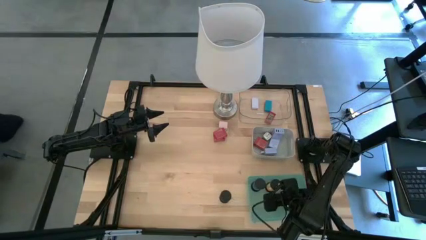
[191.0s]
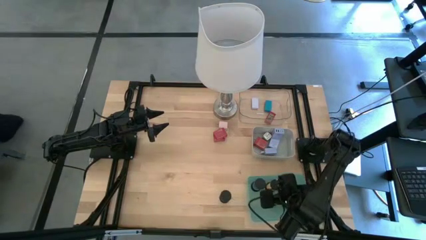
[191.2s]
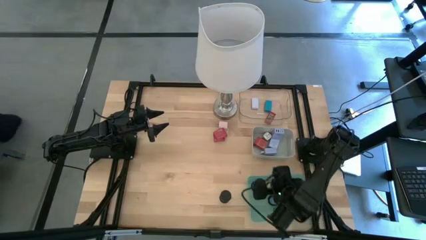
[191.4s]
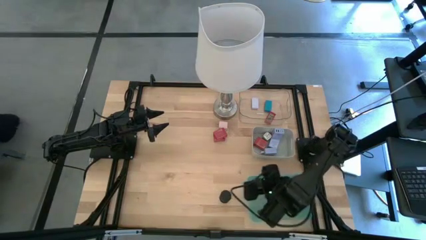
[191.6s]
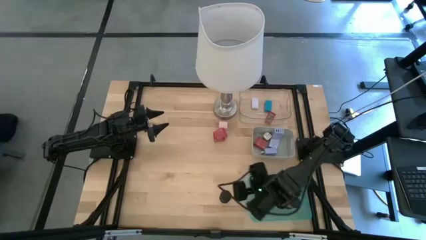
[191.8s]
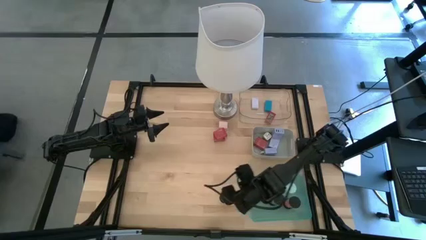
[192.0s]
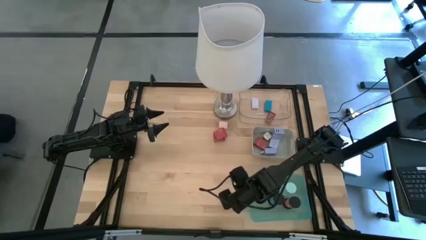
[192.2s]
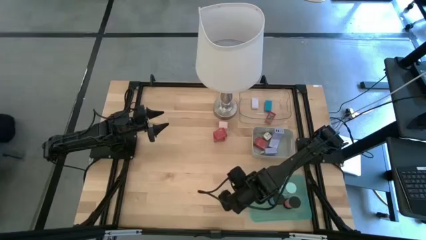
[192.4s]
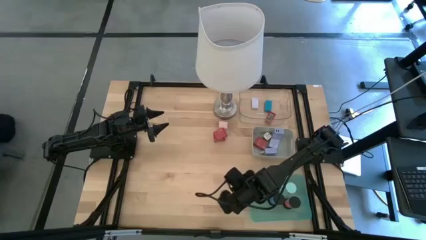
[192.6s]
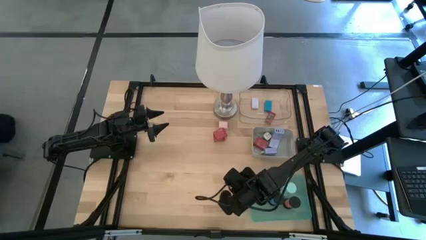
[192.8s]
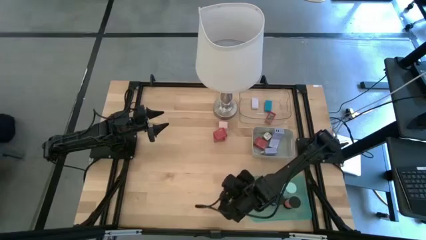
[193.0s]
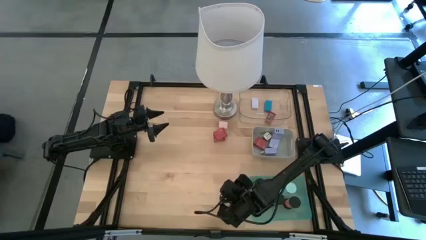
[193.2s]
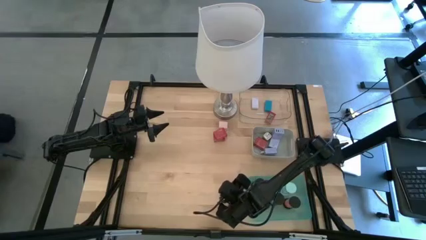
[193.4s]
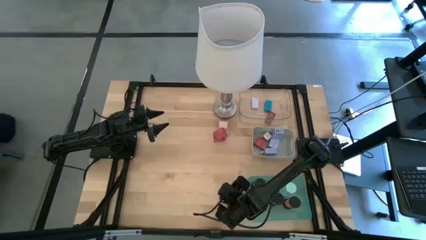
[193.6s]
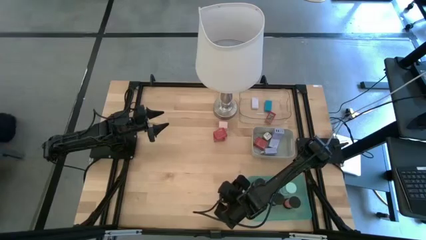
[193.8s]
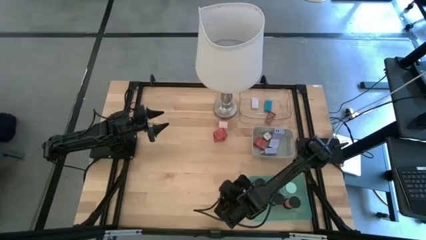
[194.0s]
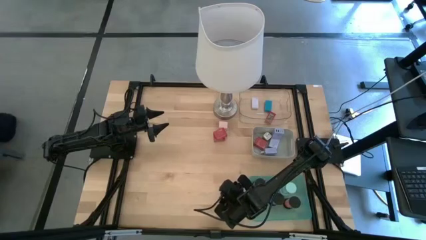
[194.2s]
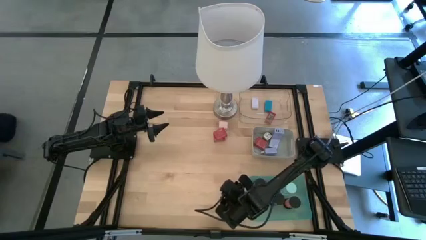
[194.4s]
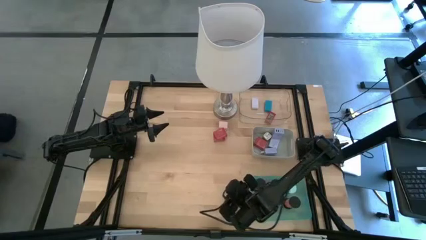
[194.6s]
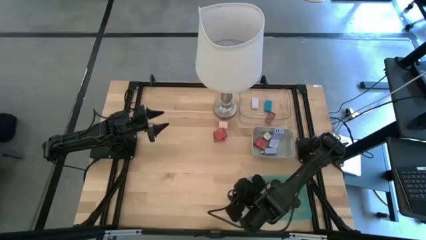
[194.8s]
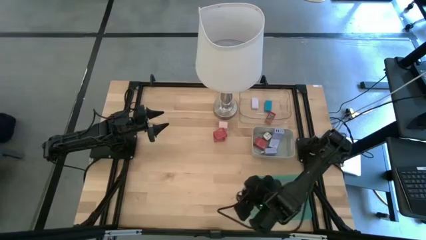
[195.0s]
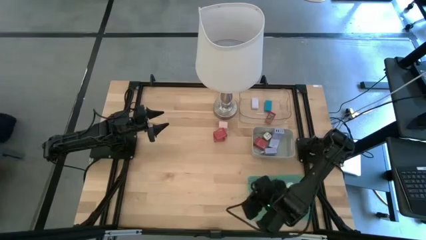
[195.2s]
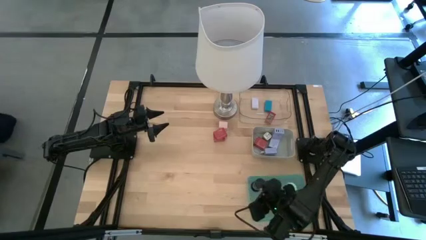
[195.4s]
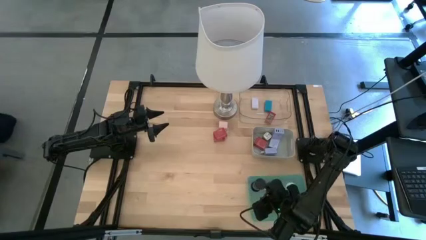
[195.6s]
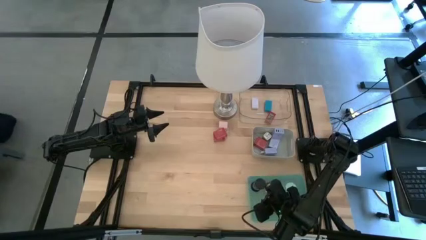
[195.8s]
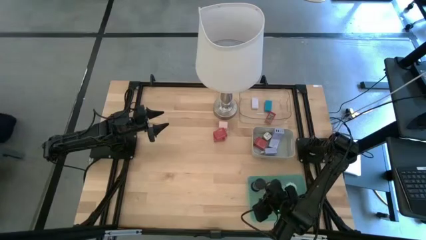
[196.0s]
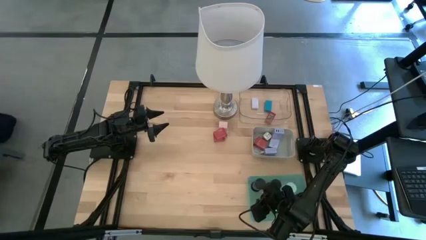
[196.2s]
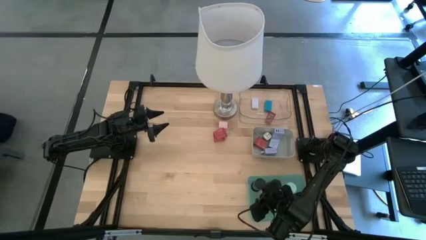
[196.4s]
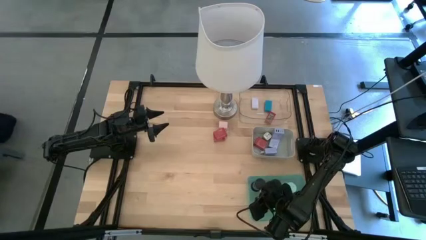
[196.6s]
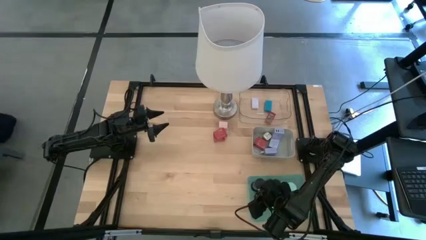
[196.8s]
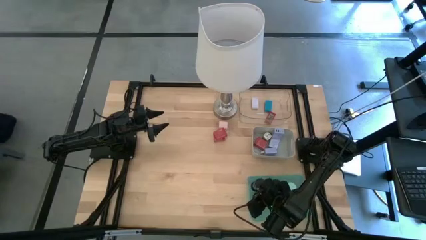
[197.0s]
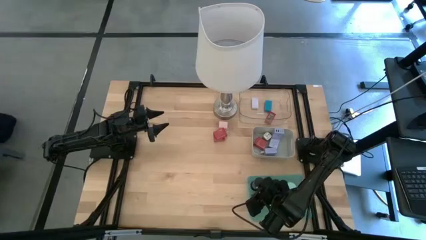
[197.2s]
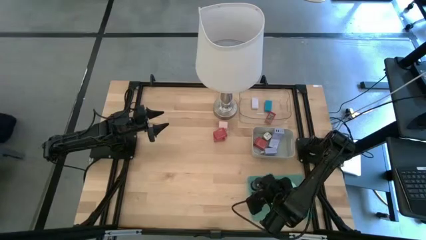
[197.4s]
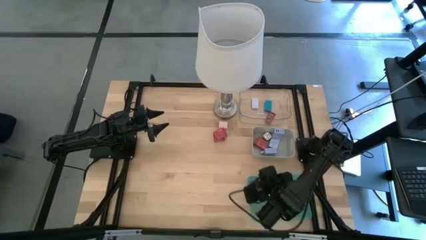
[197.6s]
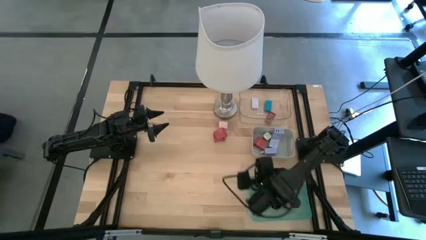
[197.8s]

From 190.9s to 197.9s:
Task: Pick & Place Office items
Put the white hourglass into the light blue bin

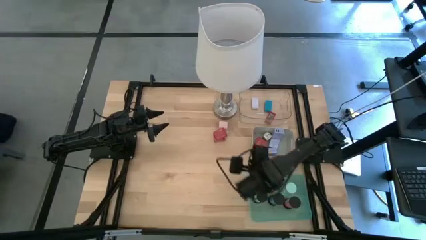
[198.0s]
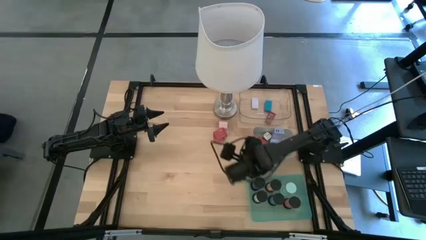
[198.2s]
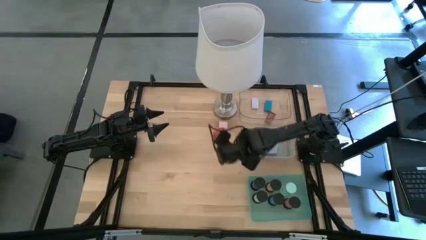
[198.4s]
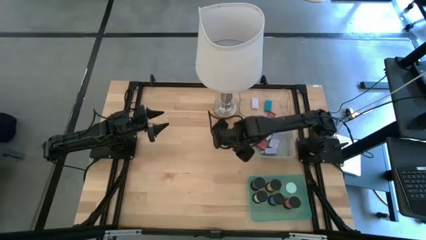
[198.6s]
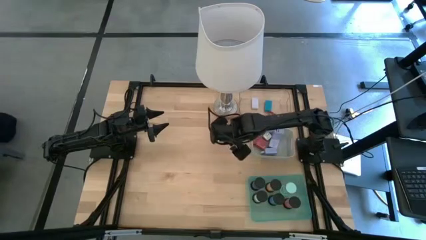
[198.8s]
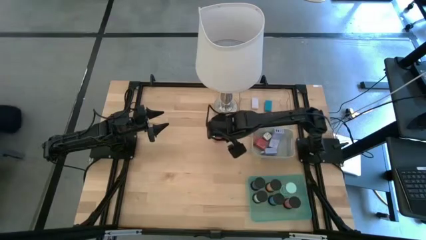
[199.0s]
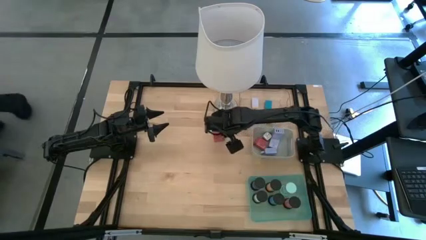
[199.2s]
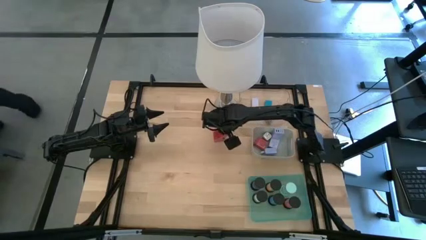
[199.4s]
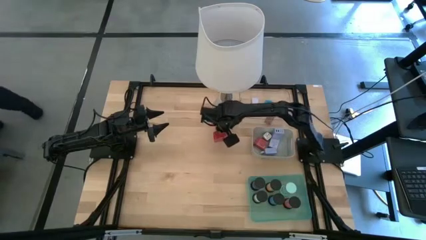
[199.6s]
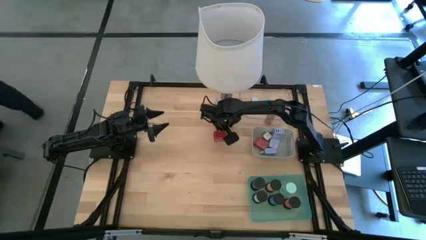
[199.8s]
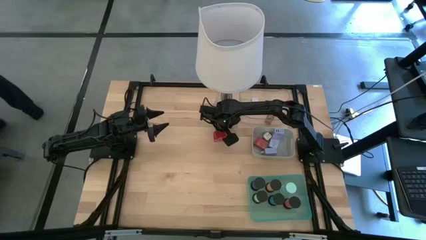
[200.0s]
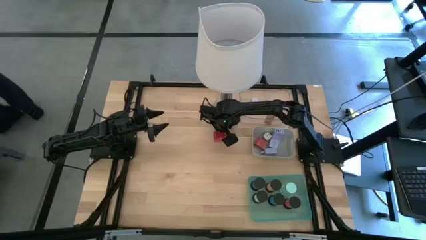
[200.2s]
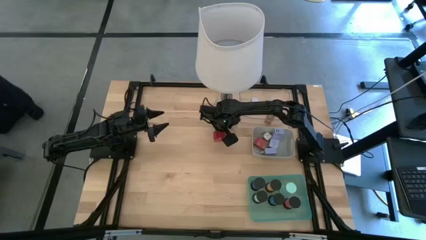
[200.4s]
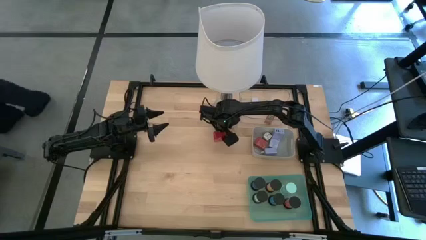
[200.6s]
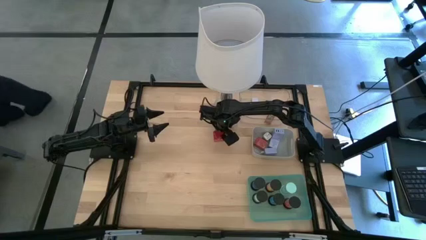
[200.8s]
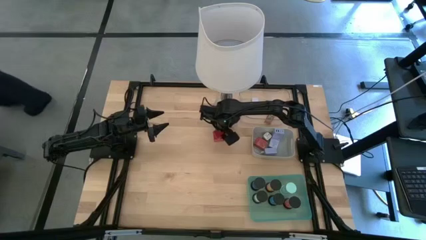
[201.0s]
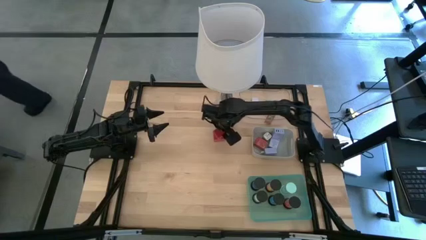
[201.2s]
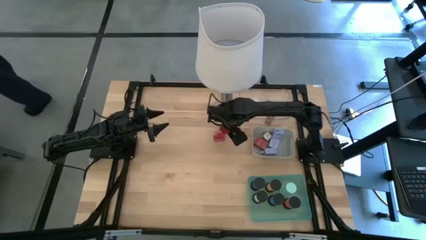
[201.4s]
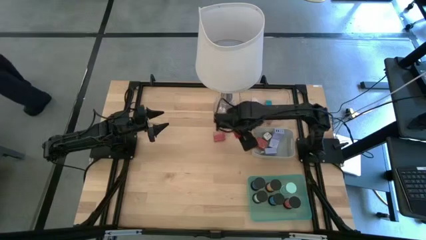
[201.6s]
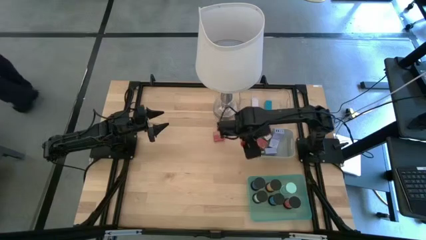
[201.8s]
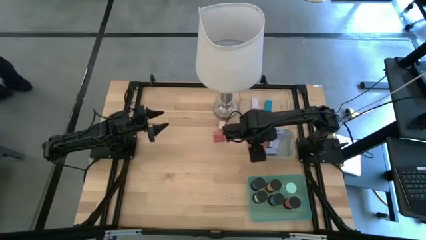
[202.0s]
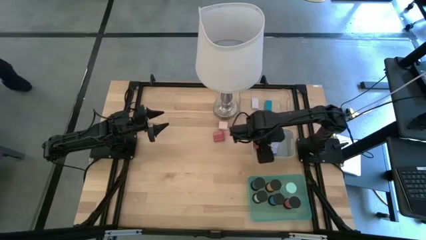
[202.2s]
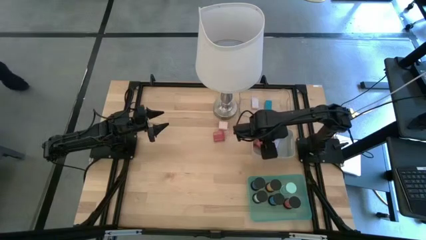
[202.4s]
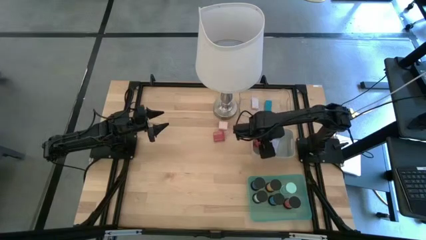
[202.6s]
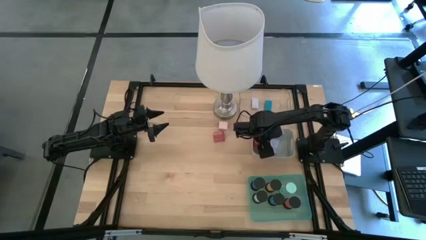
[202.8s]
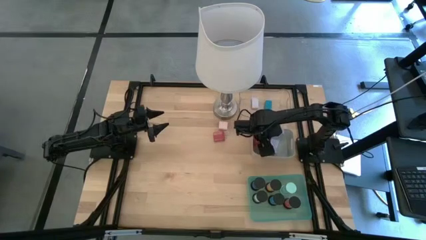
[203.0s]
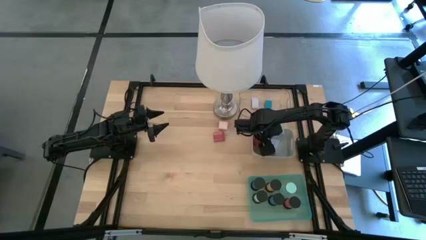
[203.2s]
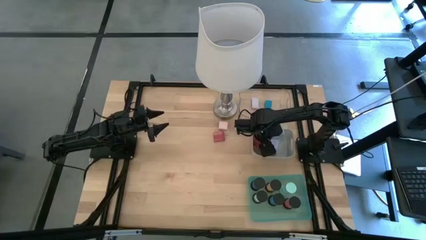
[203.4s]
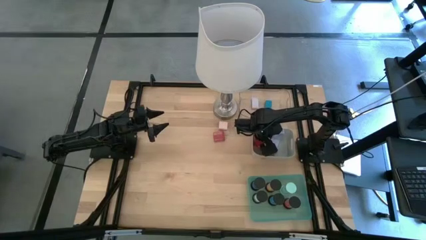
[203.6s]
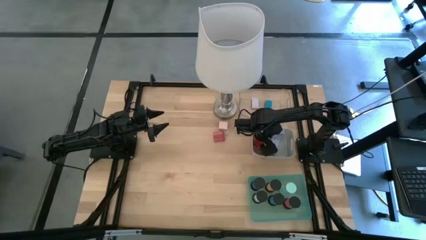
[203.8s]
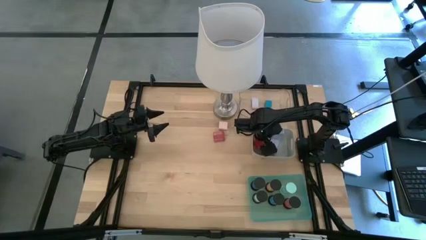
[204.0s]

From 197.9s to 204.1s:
Put the red charger adapter into the gray bin

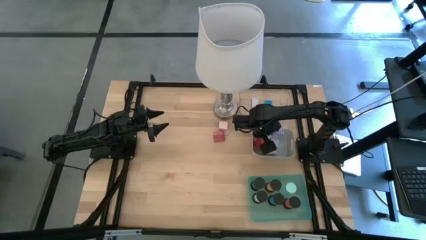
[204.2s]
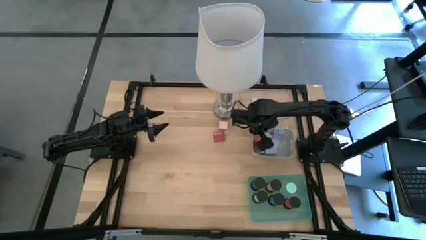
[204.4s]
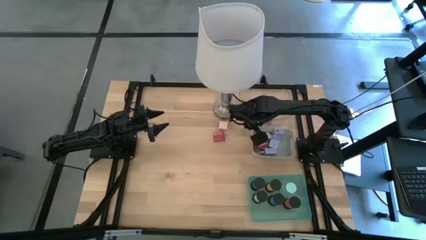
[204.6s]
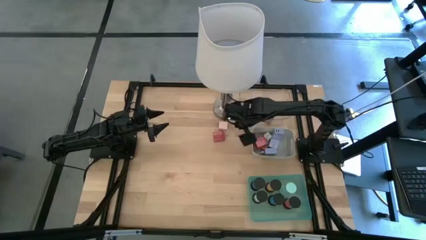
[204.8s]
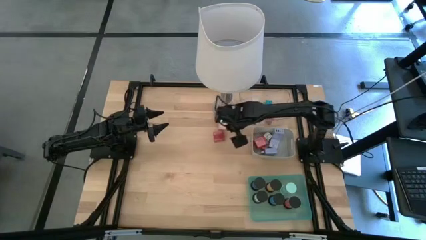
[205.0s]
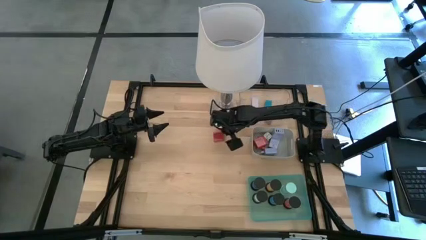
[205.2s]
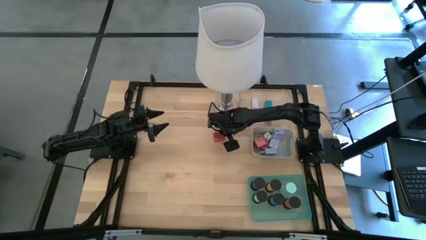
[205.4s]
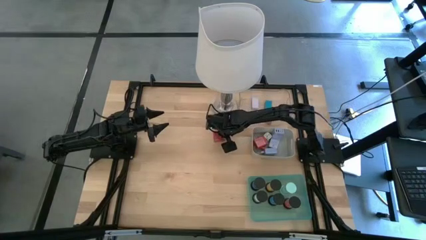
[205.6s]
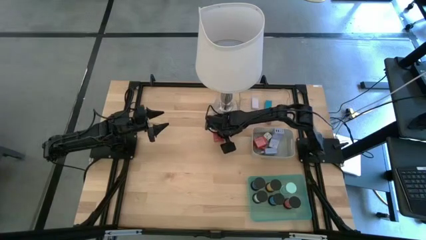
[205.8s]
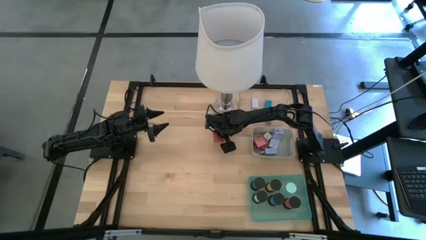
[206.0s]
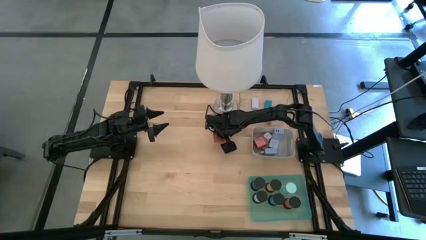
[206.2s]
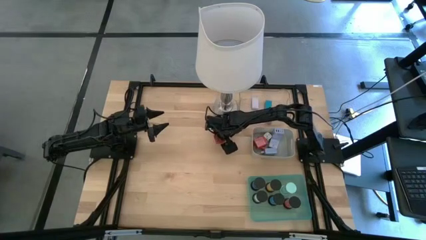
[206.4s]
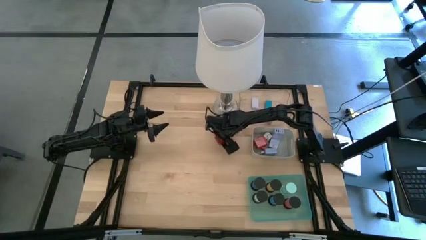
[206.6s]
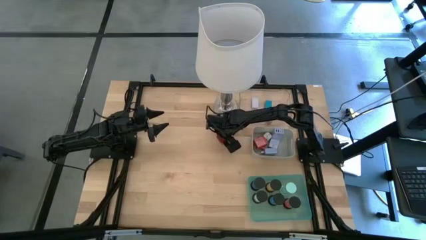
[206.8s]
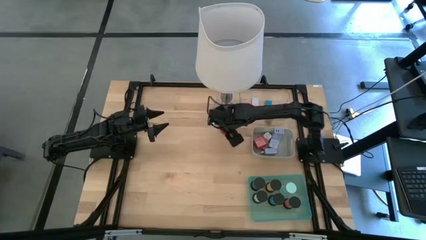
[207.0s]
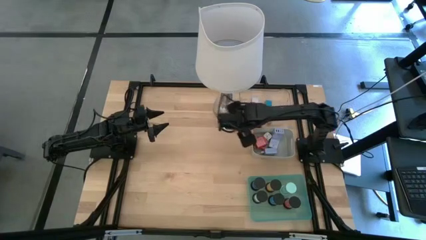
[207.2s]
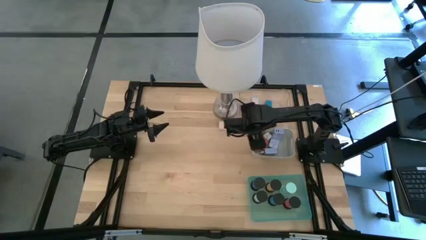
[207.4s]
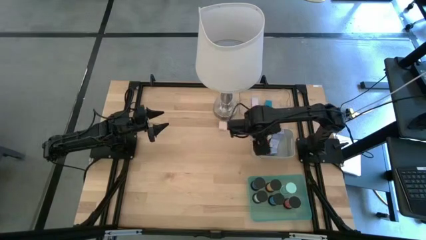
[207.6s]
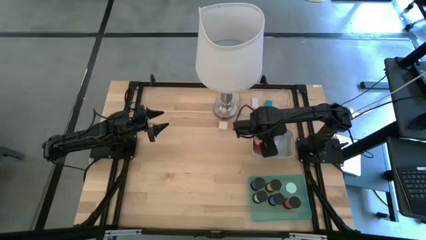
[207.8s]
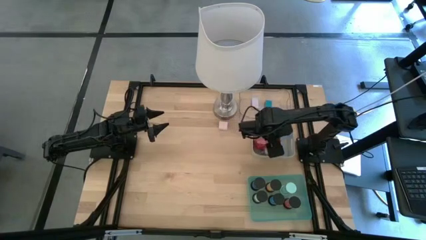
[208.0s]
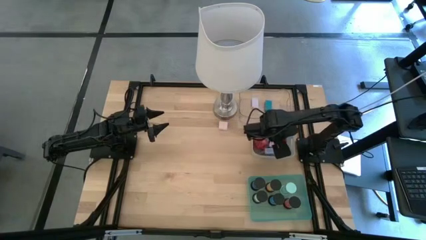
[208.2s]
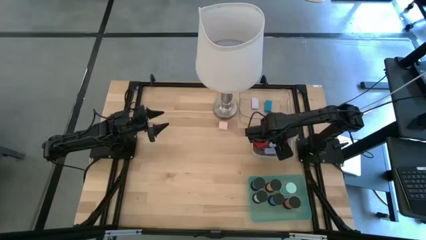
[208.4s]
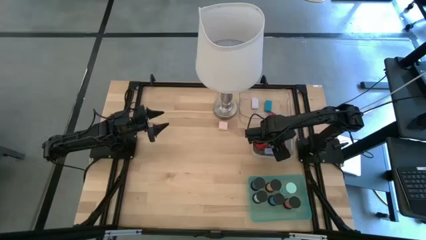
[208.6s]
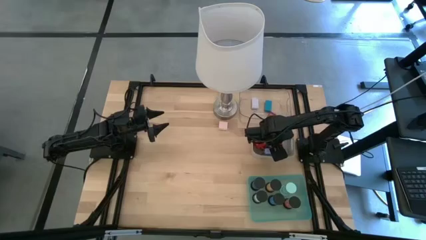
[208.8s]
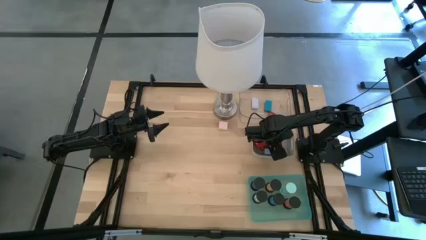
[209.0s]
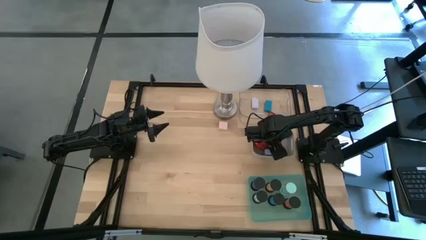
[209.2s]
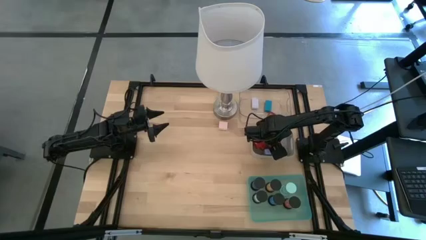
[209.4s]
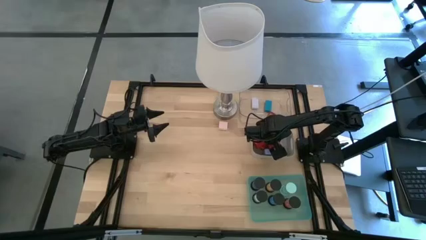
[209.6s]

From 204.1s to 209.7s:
Put the red charger adapter into the gray bin
